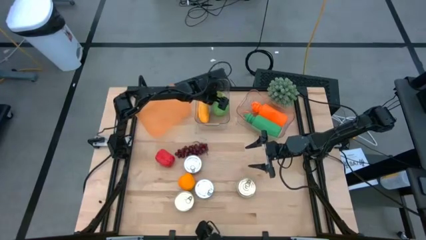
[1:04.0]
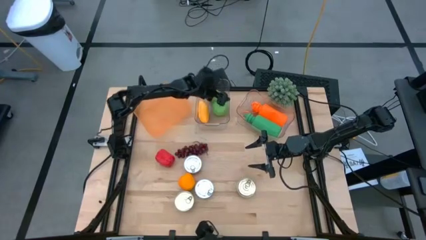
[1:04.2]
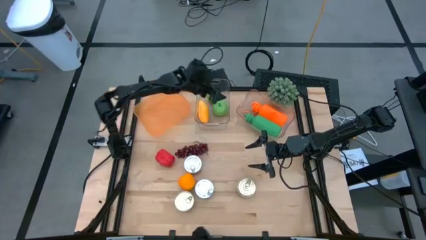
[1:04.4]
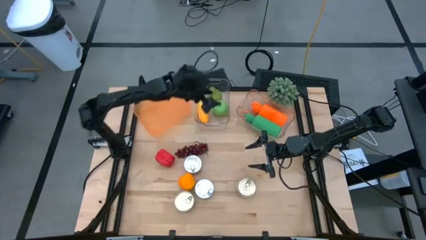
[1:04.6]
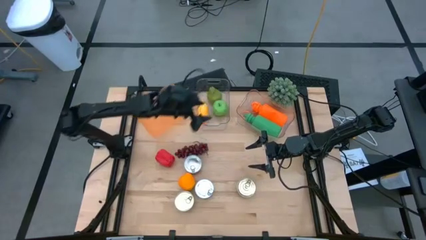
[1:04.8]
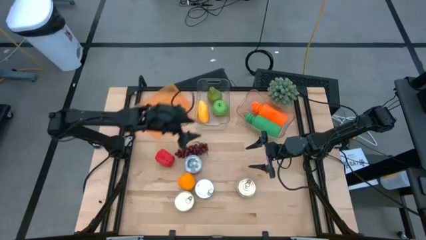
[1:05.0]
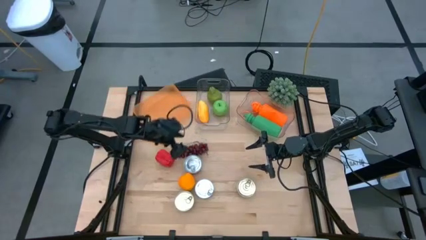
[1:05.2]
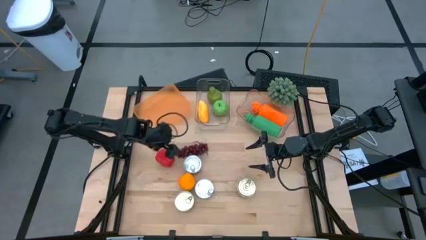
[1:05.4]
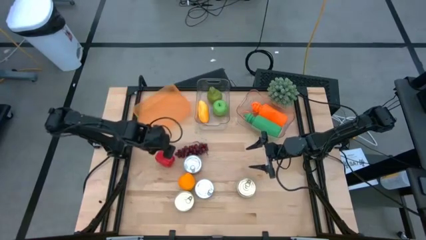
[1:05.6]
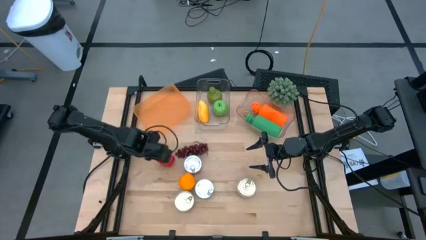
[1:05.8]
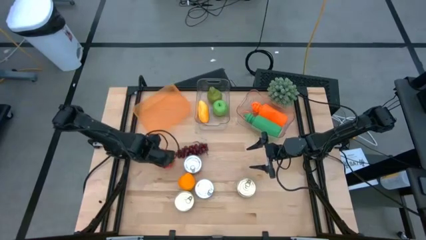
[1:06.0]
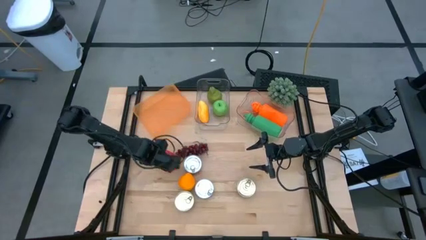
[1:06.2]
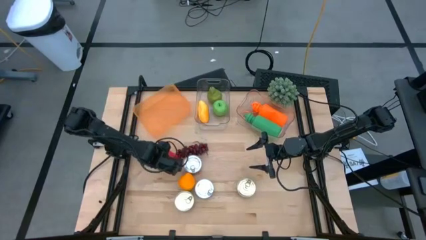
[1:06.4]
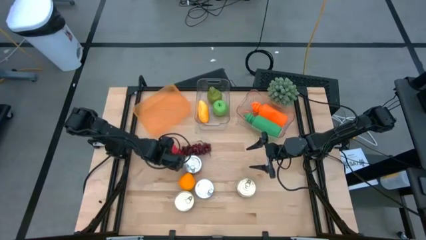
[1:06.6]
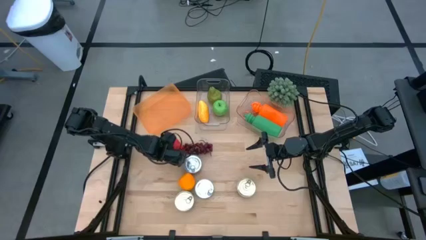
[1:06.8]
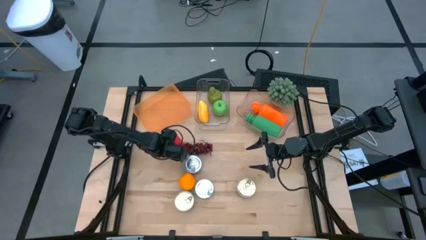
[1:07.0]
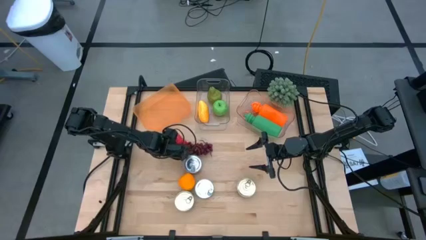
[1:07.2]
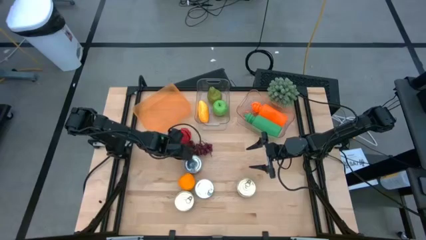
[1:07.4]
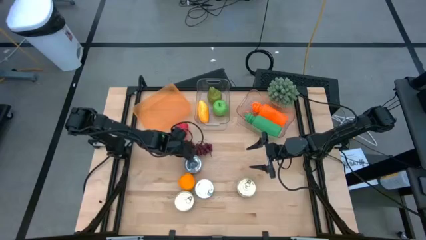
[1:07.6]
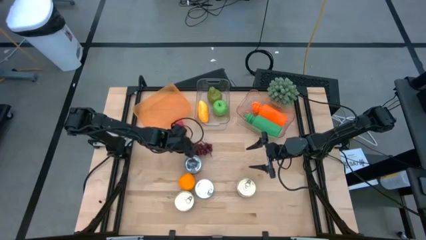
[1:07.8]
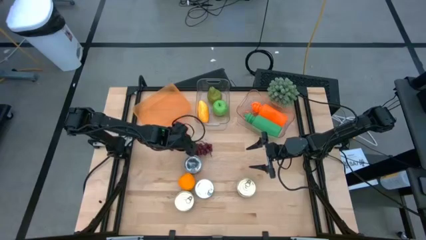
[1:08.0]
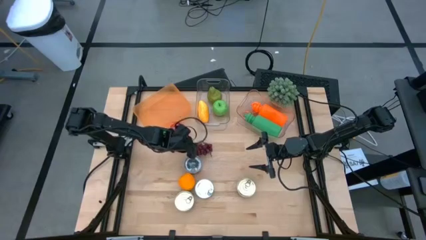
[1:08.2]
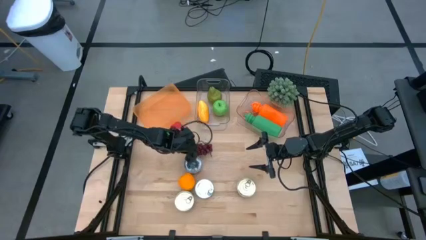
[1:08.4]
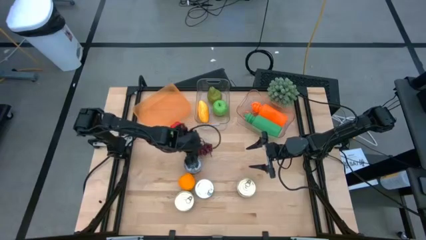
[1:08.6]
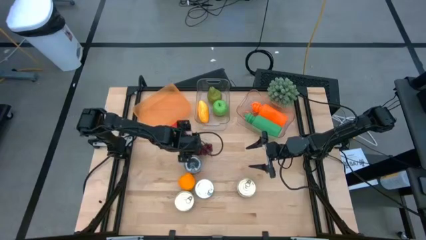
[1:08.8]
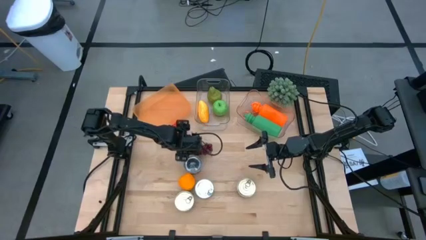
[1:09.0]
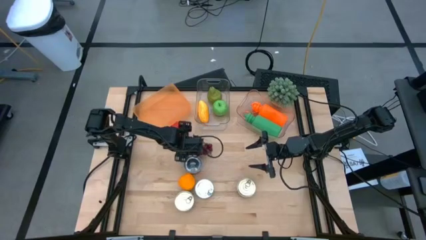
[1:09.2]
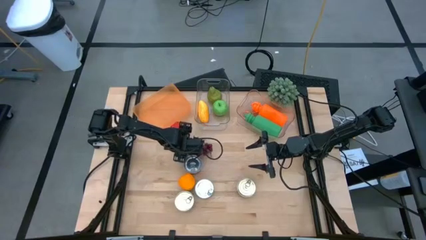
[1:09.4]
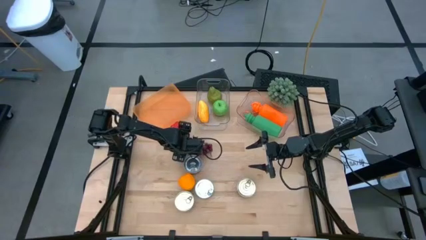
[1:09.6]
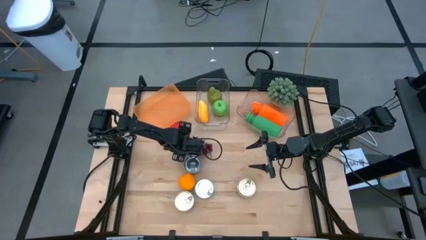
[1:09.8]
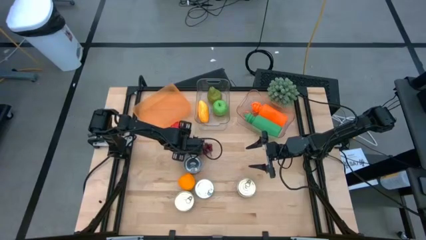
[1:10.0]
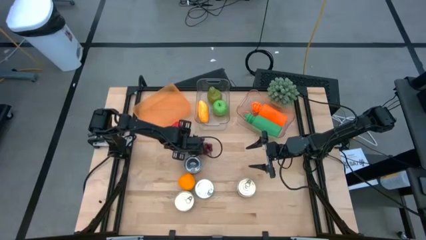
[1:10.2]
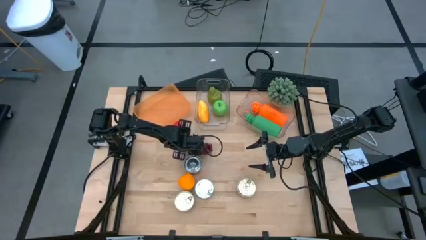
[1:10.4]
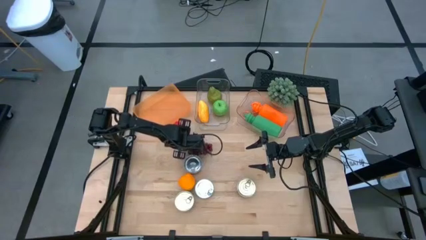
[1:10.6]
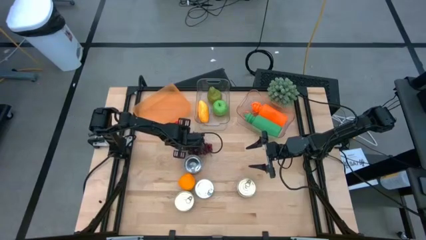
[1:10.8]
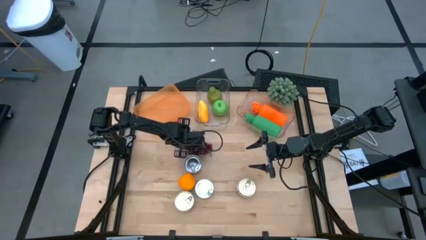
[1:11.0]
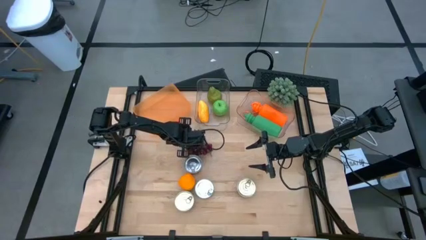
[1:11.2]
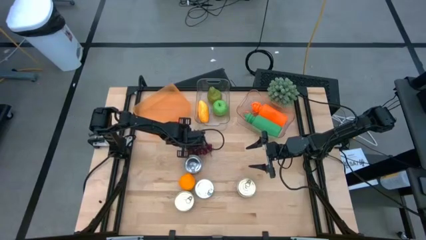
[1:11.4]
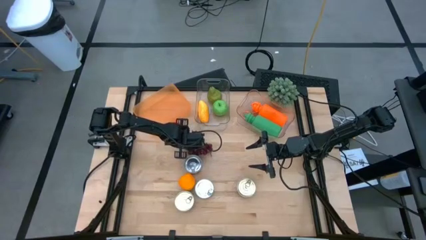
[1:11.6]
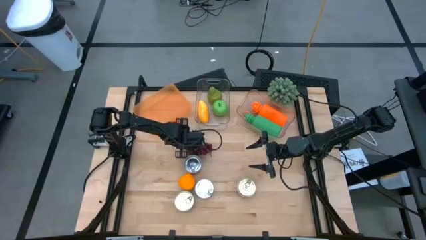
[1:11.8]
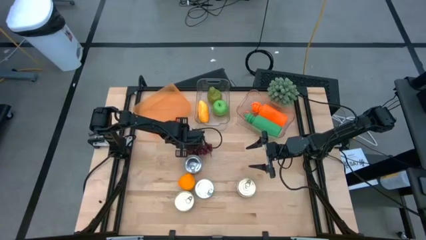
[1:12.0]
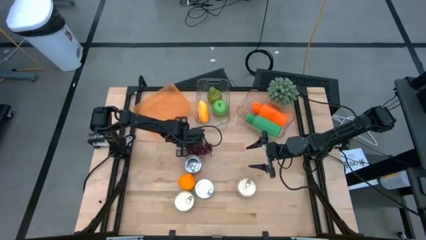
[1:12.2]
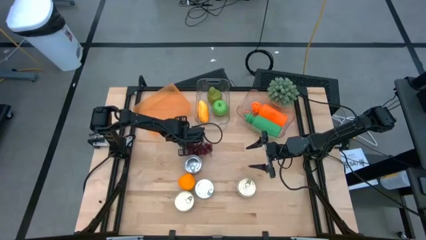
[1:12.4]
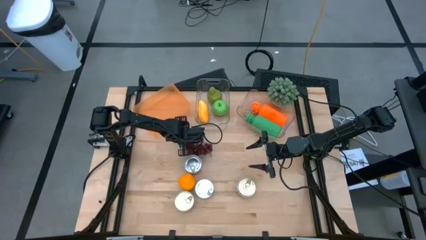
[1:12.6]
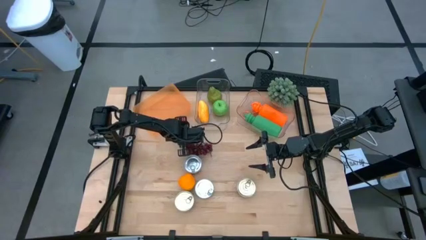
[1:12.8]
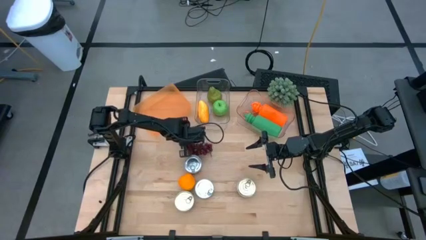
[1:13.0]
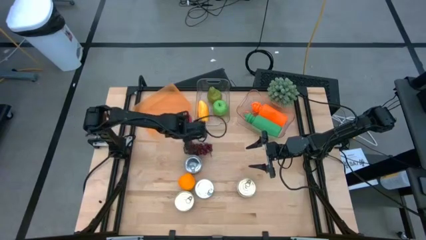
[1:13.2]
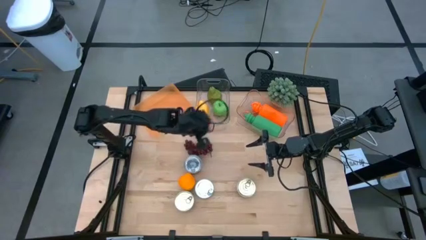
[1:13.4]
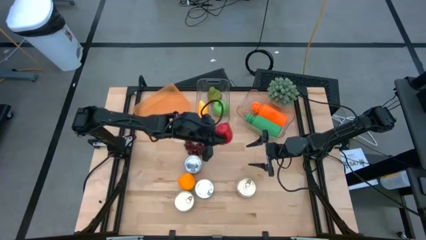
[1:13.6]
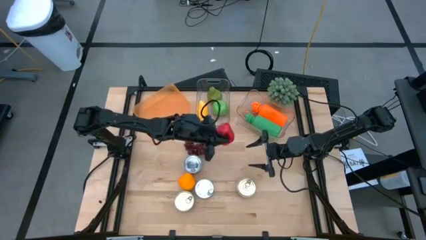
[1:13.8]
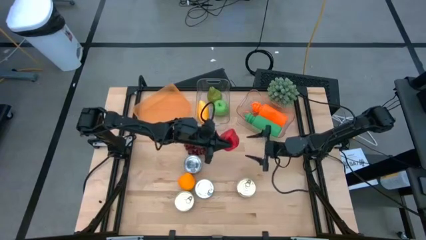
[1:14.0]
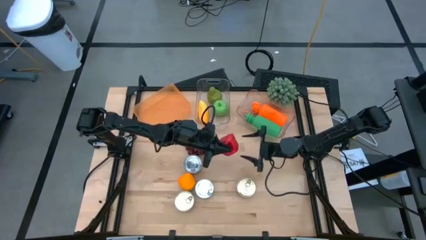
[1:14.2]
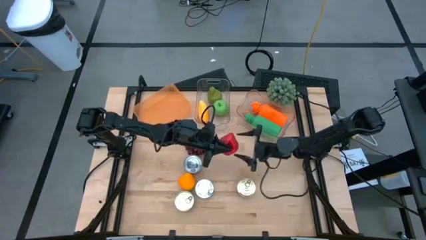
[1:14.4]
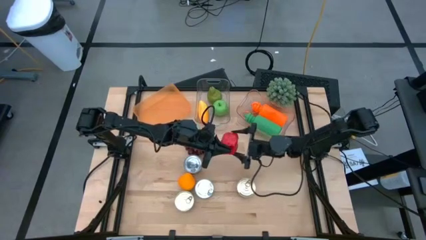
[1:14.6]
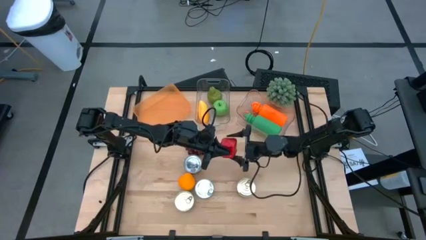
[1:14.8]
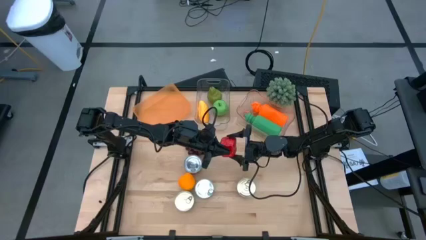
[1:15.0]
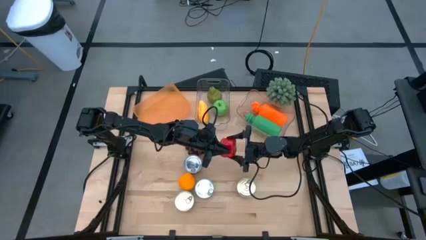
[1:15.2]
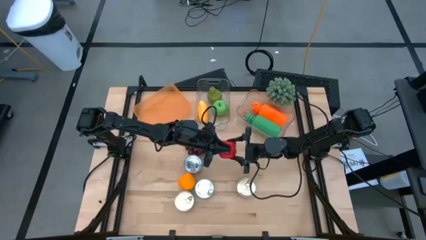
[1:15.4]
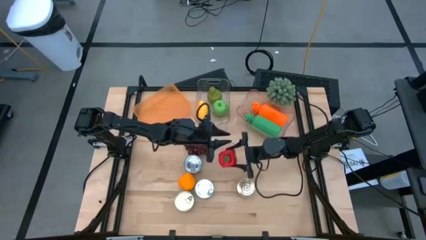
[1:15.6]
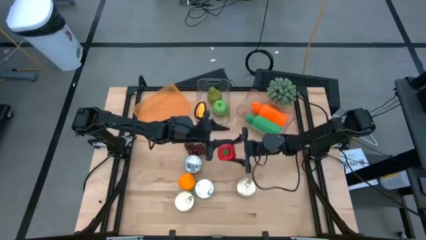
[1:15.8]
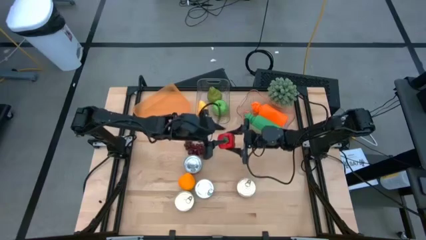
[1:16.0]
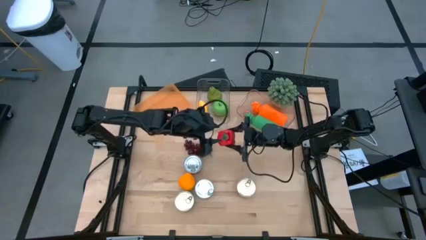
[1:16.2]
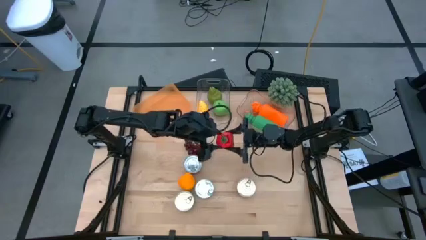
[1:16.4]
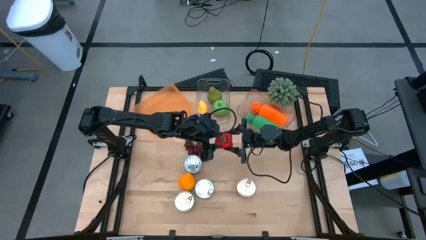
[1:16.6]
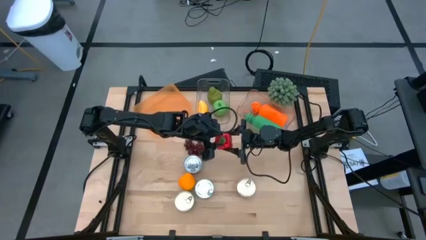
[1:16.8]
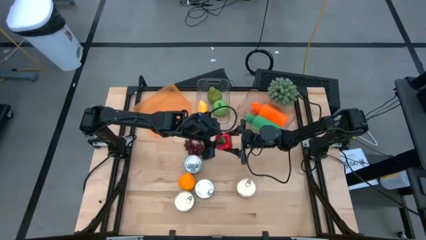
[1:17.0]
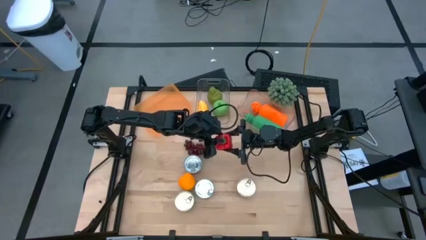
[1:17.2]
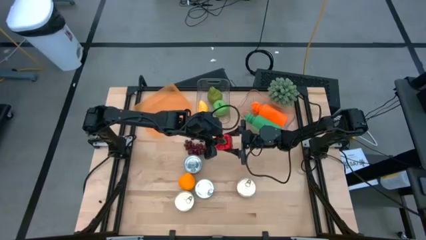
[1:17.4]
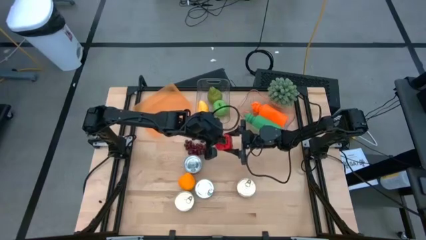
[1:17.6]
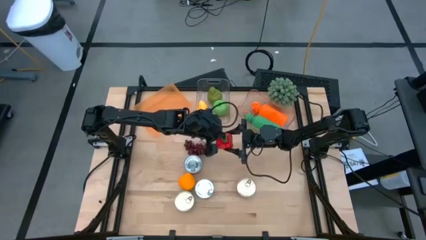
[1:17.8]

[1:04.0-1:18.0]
Task: Pick & Place Food Item
Put the red bell pepper into the left transparent bin
